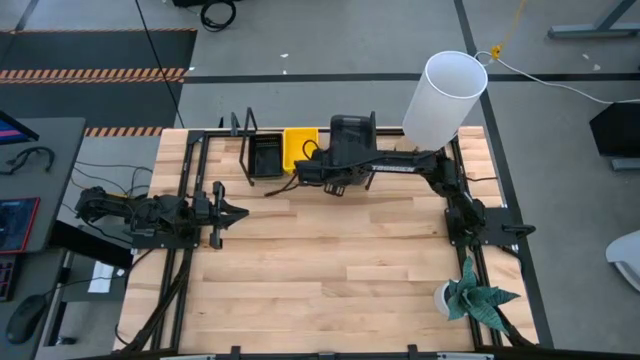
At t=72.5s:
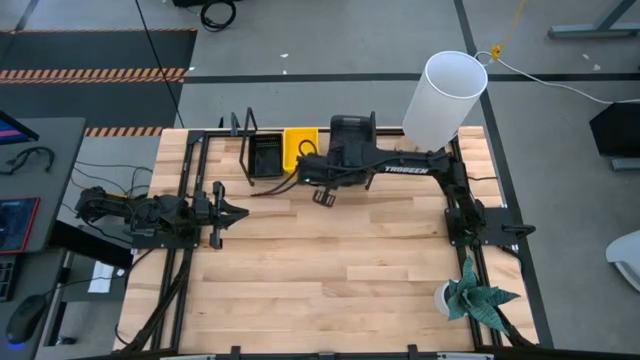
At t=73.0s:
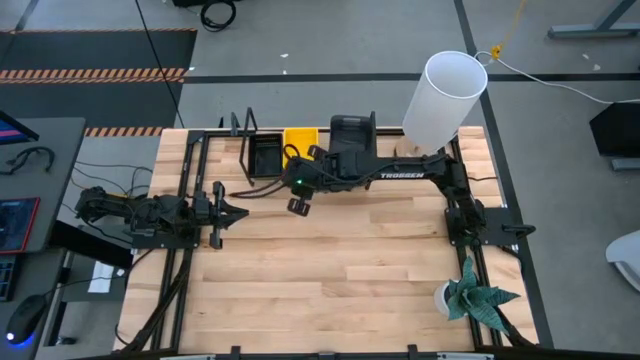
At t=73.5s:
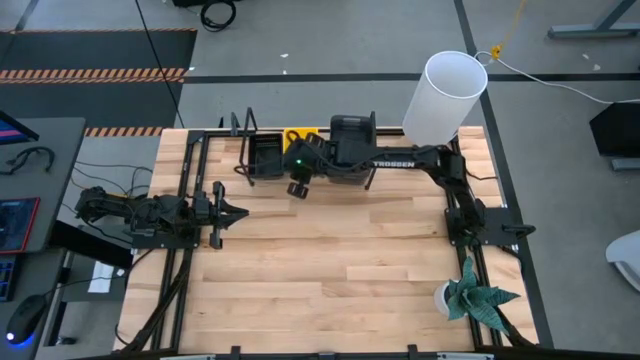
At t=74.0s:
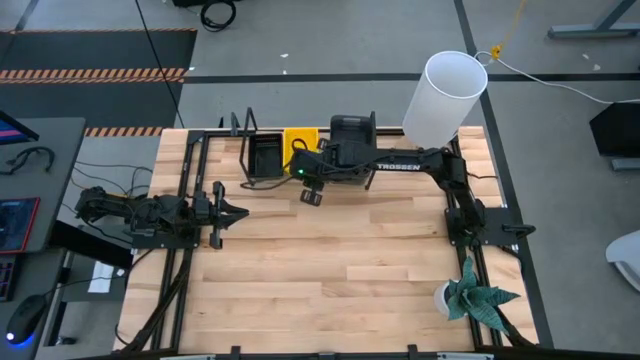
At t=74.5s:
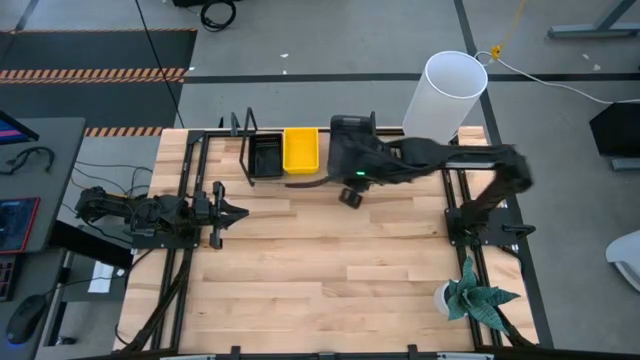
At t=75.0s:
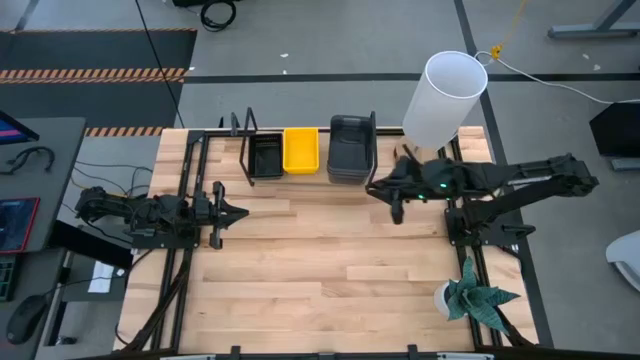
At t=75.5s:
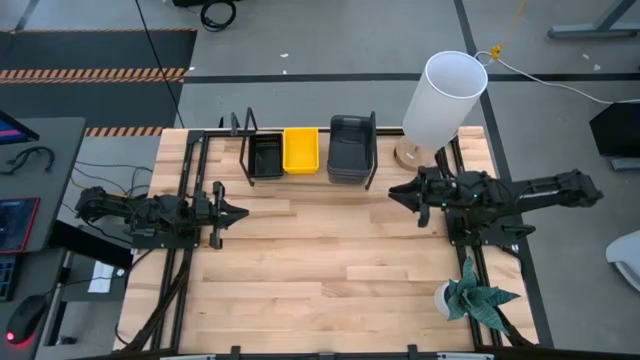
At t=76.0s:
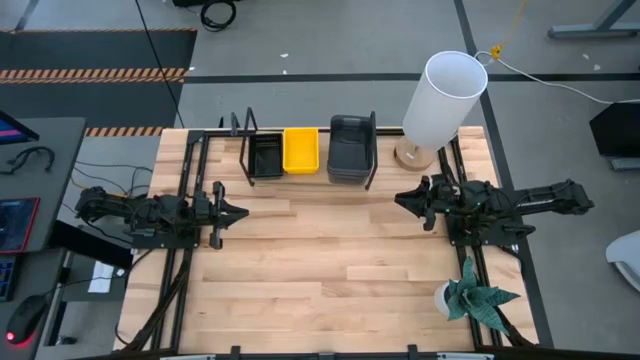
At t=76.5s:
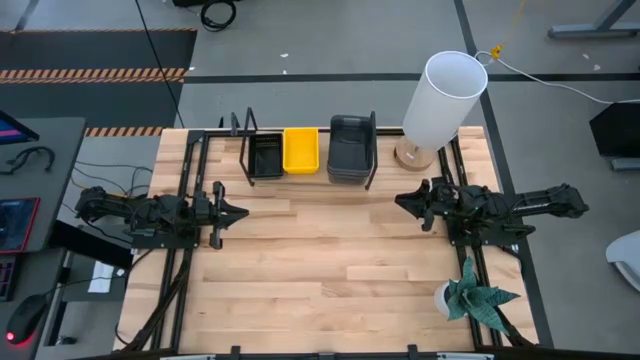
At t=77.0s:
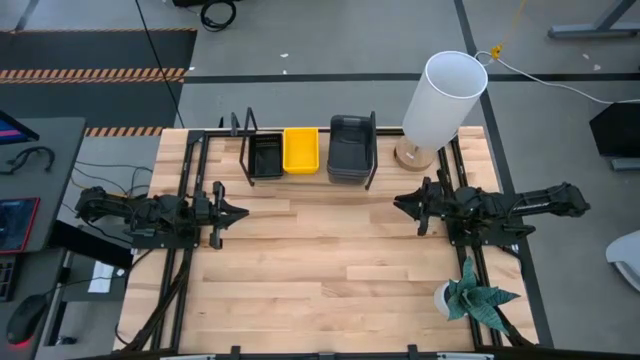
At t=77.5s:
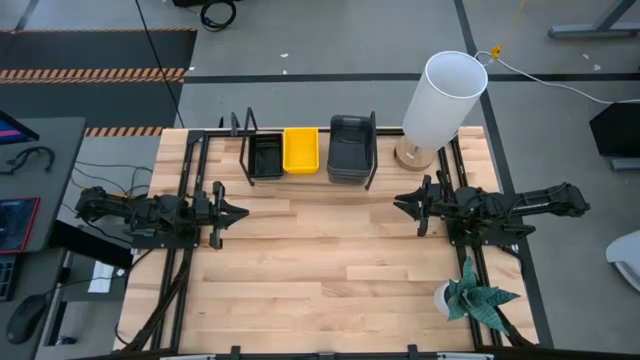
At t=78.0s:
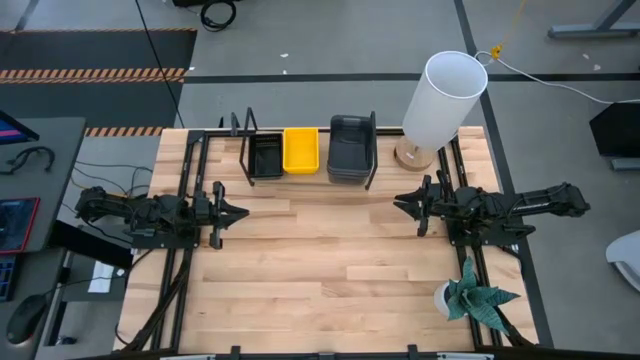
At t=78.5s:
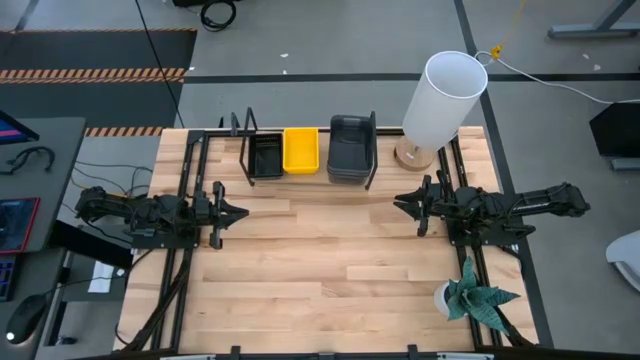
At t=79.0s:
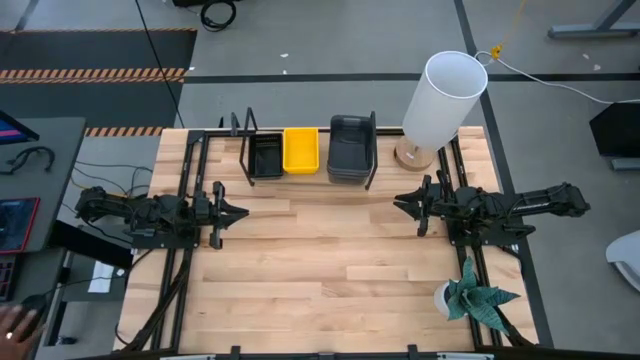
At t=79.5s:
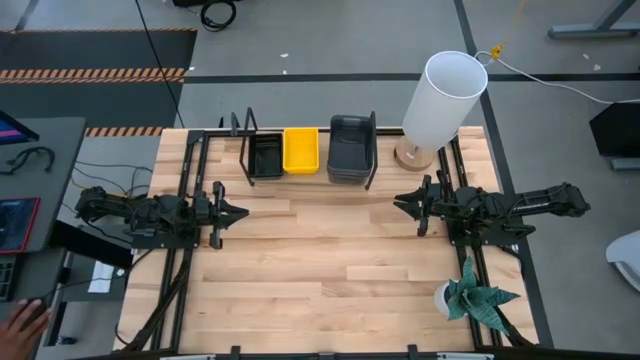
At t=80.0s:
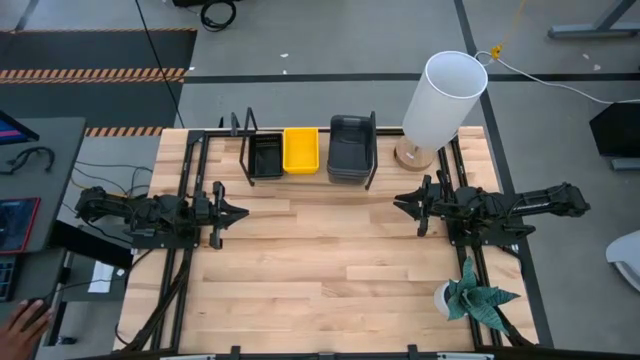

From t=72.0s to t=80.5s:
Task: Stack baskets on shelf by color
Return to Home Position

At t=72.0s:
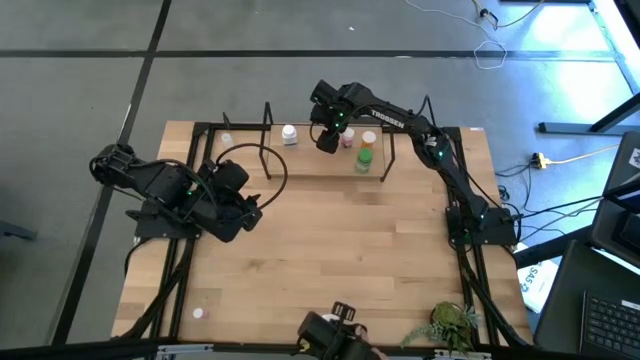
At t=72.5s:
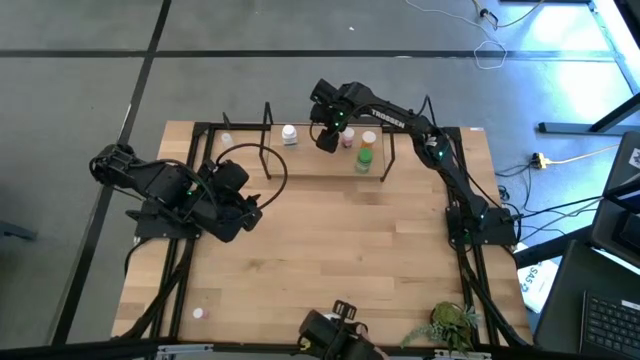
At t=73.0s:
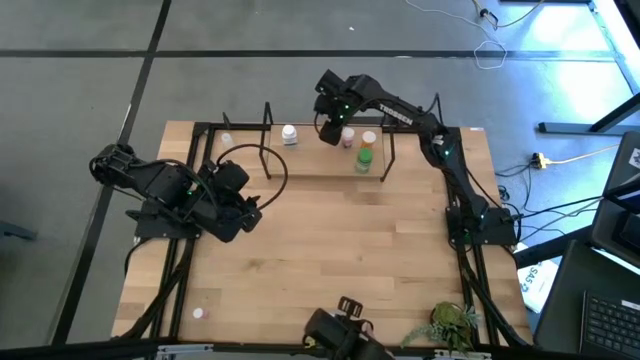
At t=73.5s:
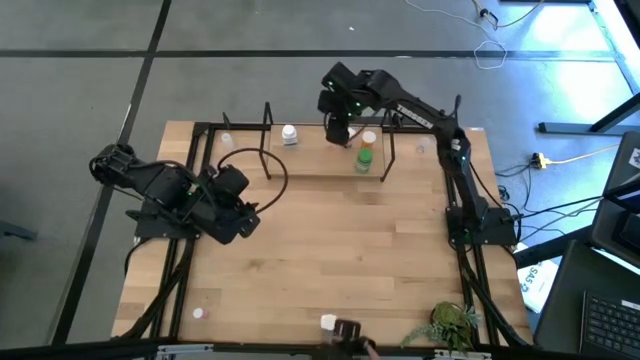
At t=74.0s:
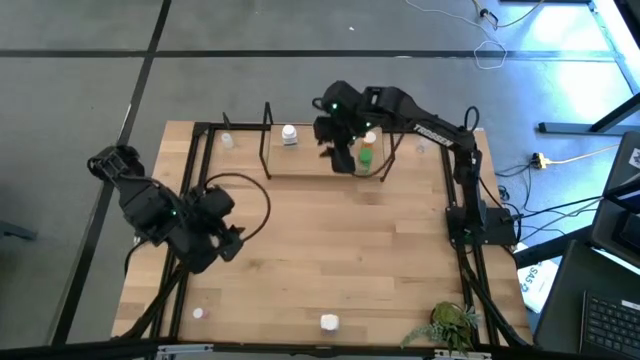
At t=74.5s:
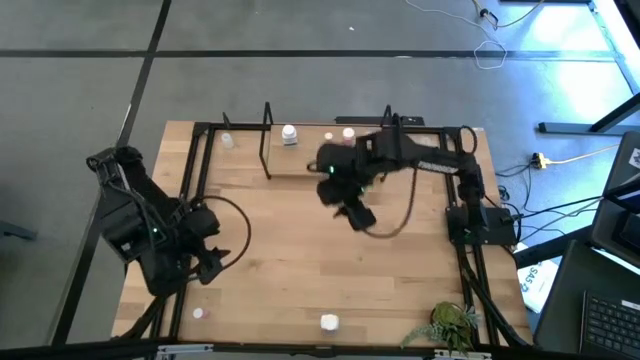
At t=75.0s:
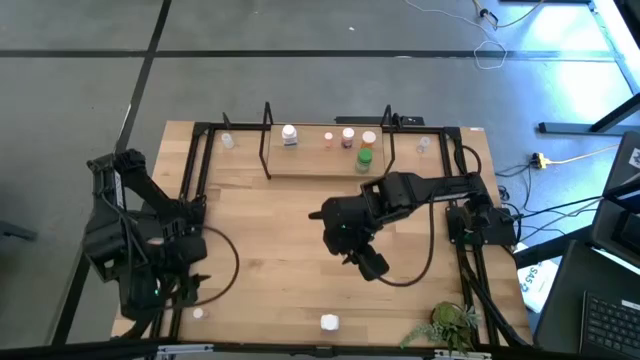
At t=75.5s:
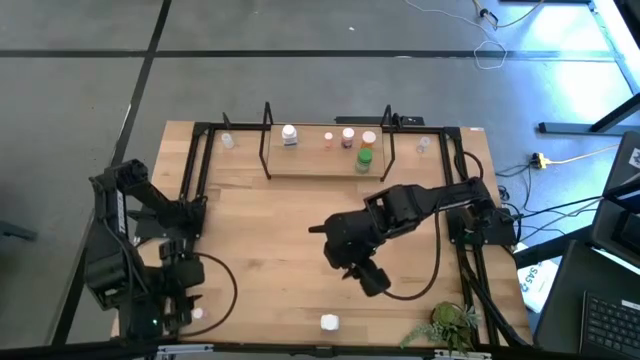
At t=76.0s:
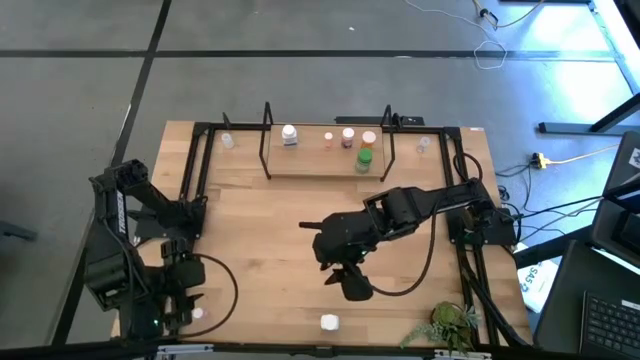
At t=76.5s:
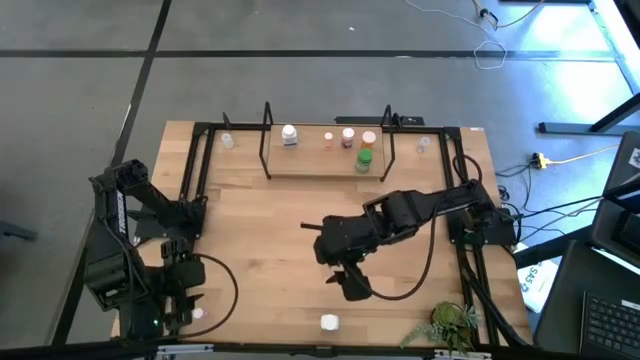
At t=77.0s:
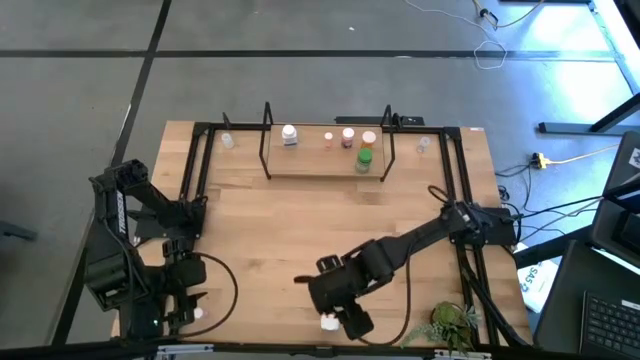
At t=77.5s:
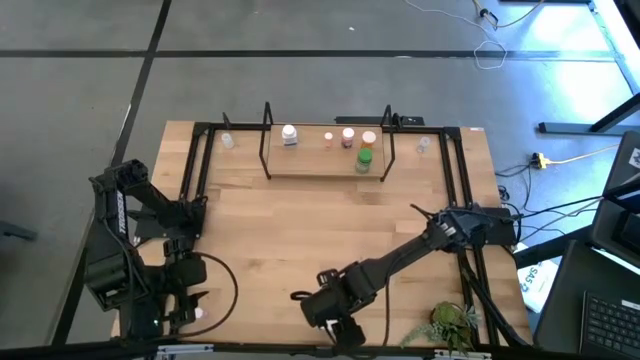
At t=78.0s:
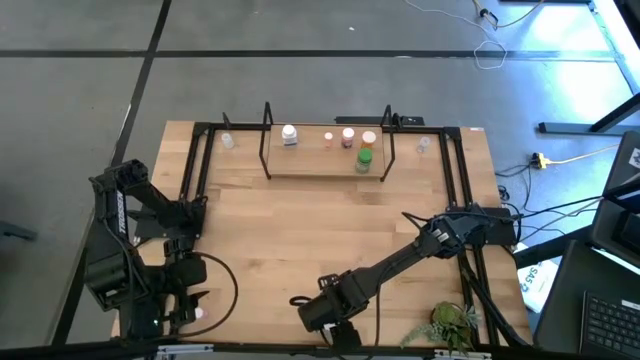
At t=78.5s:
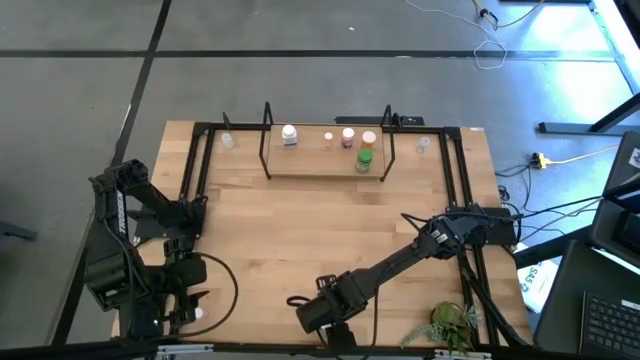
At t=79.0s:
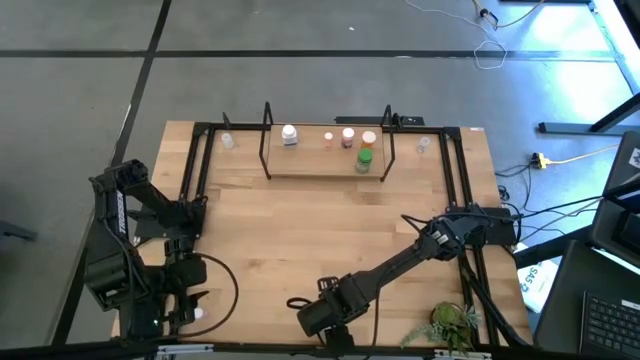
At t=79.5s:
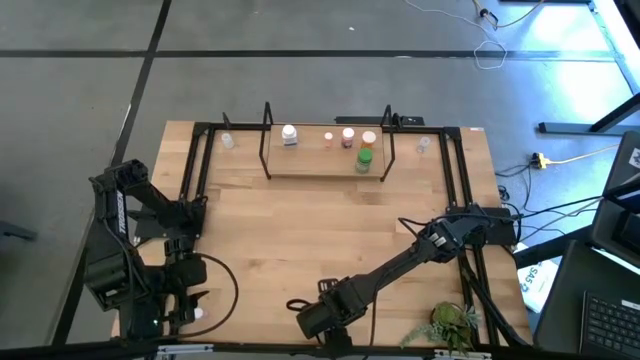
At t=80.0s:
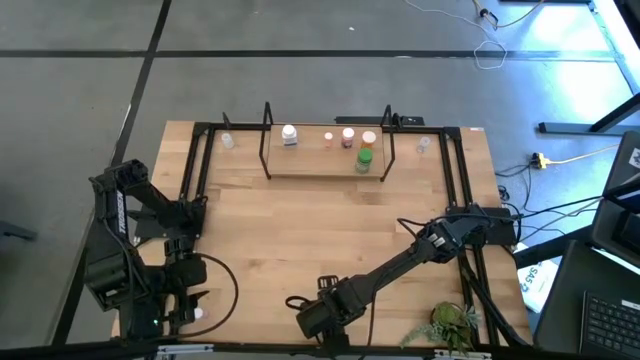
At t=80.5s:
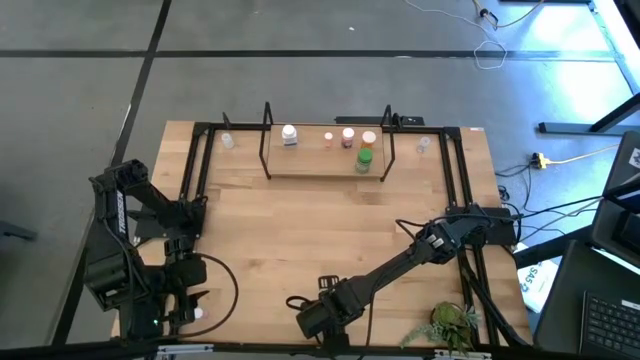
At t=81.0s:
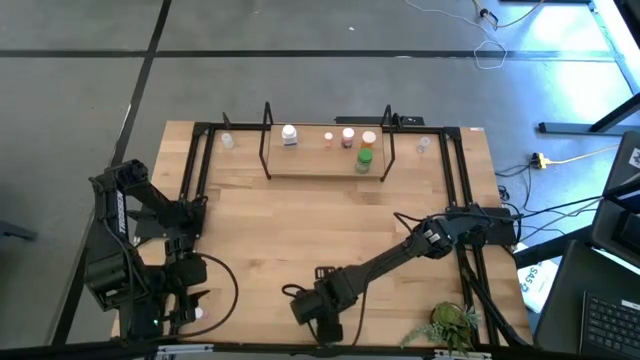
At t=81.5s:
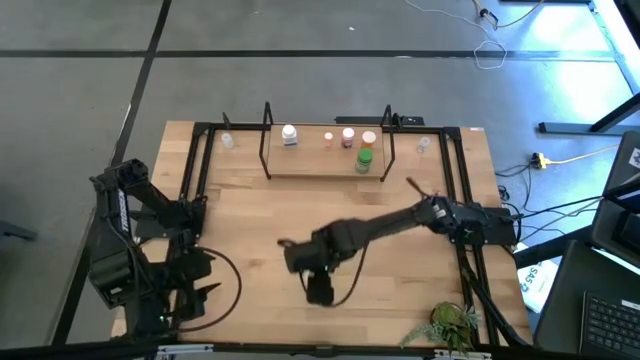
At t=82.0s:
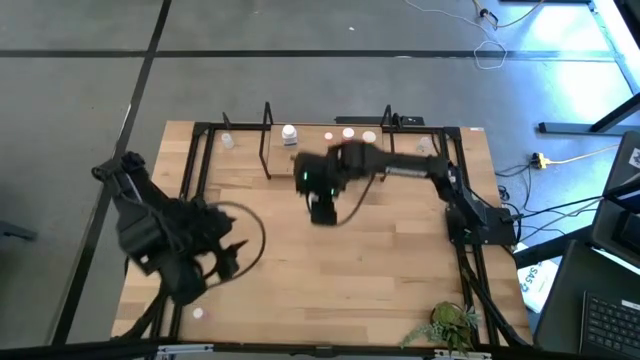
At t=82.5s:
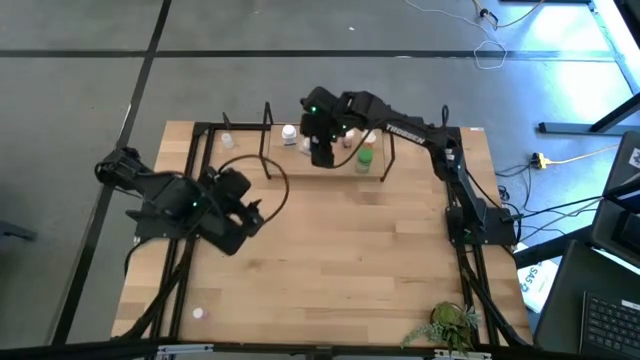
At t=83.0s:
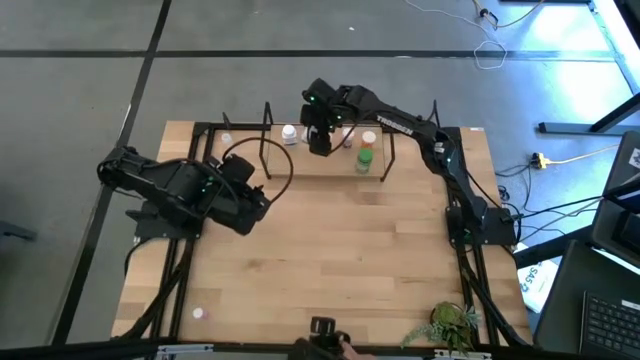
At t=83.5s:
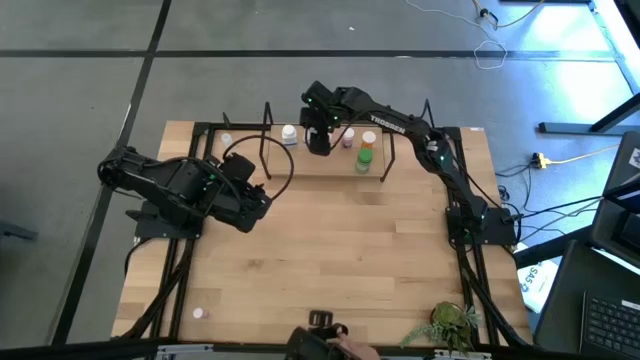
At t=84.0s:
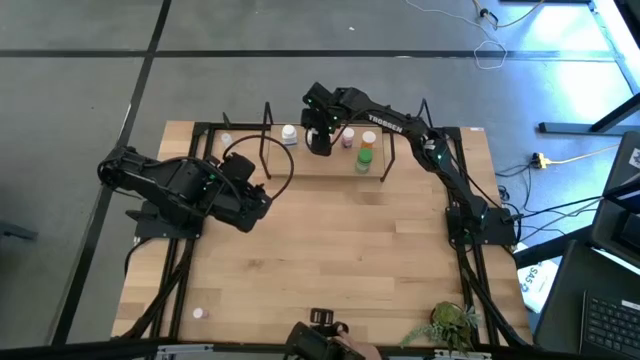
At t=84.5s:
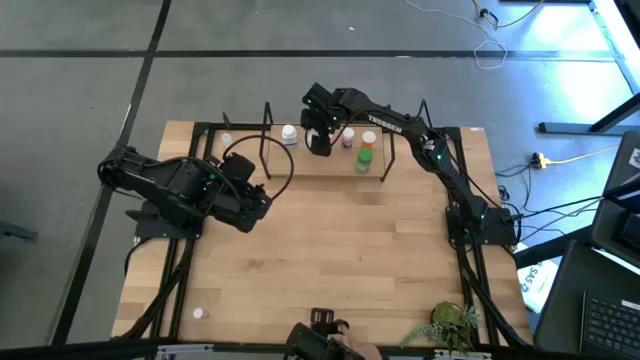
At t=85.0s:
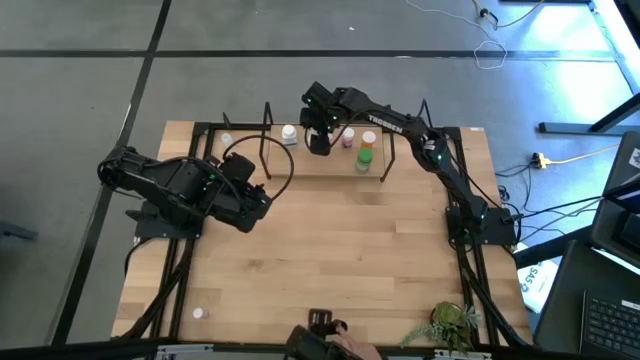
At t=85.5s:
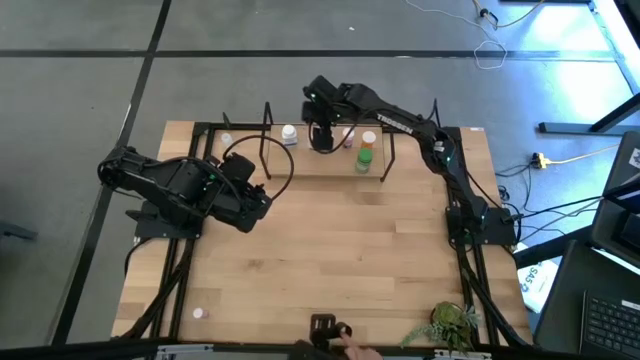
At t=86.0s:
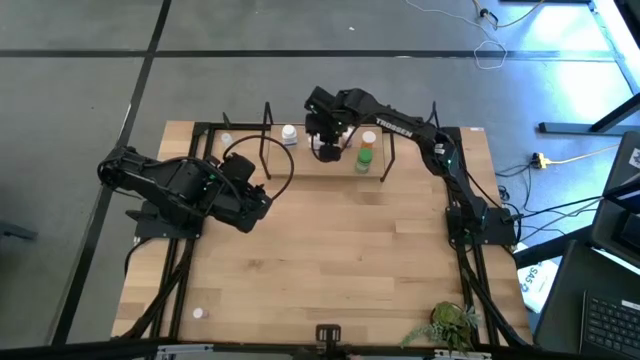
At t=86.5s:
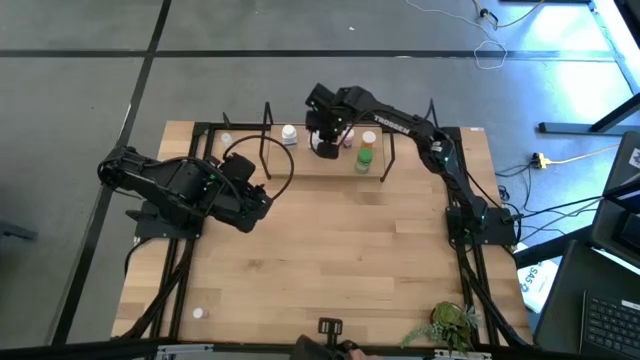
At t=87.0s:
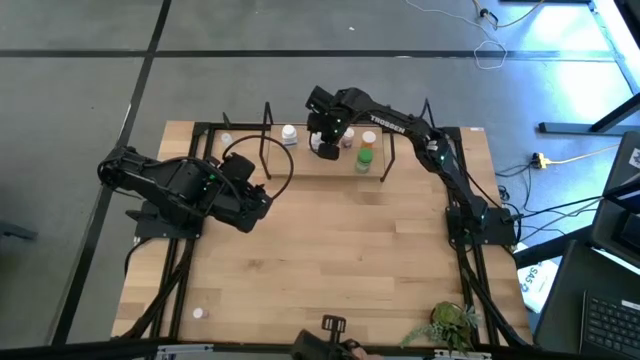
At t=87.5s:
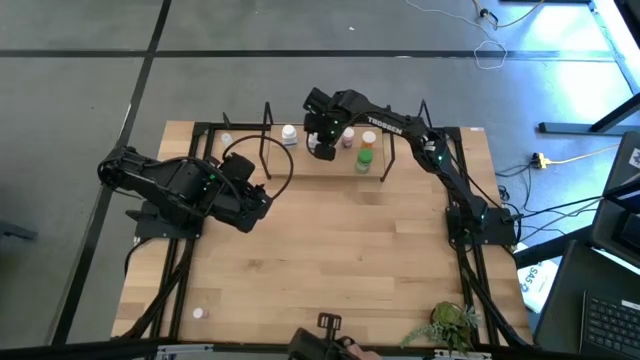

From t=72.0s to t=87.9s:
Task: Pick and place medicine bottles onto shelf by color
Put the white and blue pill bottle on the shelf
